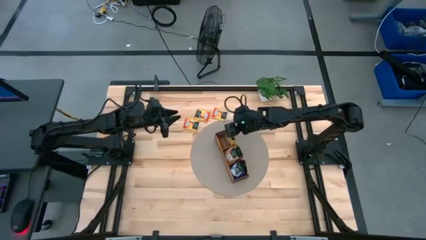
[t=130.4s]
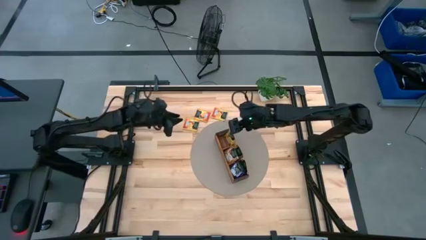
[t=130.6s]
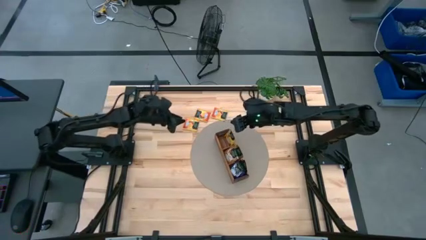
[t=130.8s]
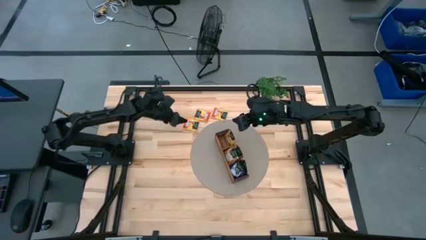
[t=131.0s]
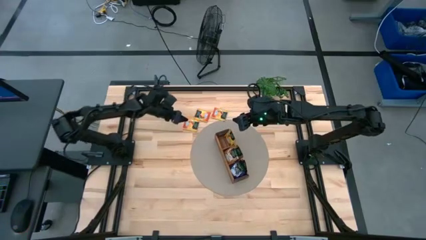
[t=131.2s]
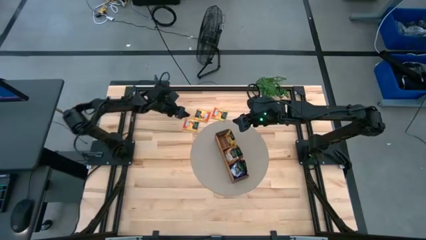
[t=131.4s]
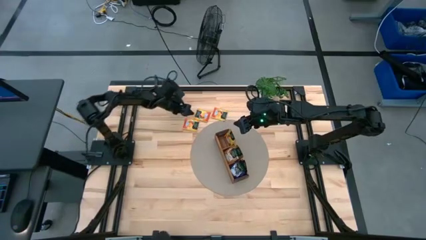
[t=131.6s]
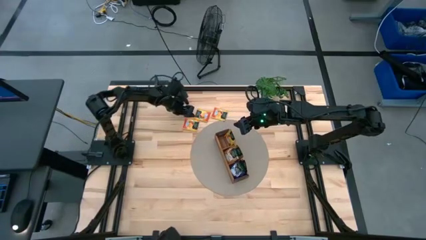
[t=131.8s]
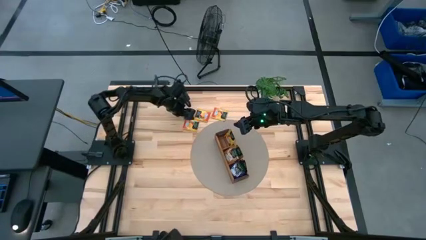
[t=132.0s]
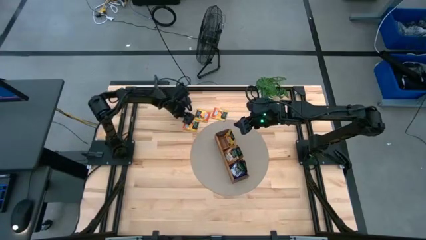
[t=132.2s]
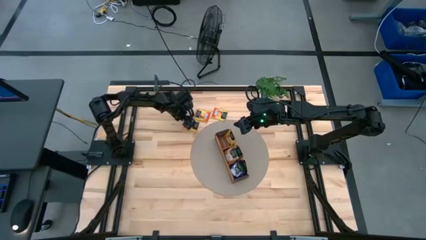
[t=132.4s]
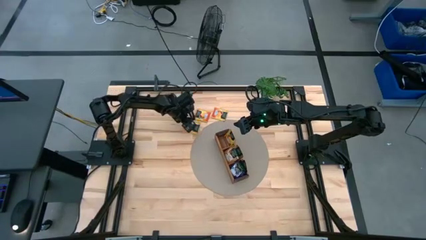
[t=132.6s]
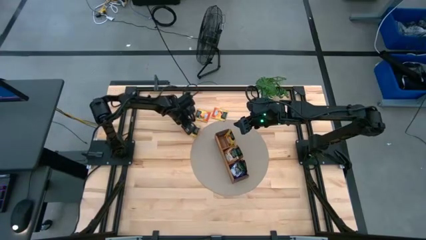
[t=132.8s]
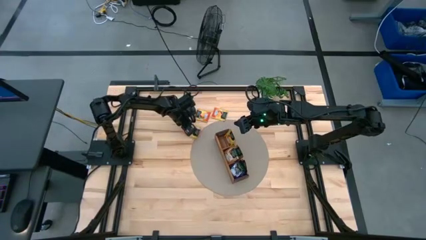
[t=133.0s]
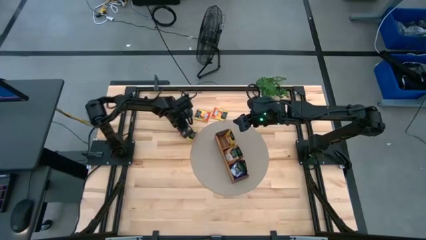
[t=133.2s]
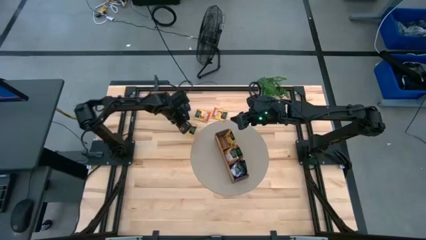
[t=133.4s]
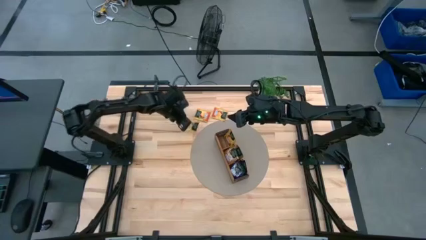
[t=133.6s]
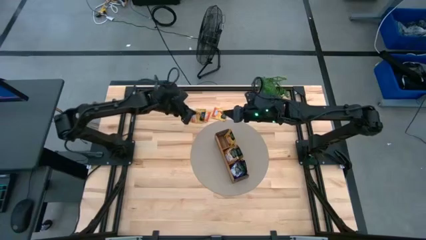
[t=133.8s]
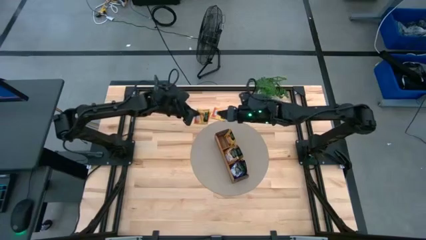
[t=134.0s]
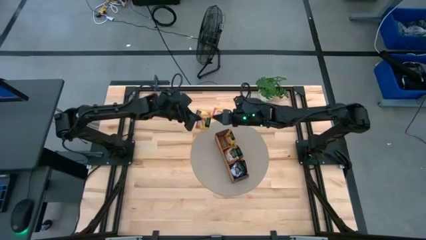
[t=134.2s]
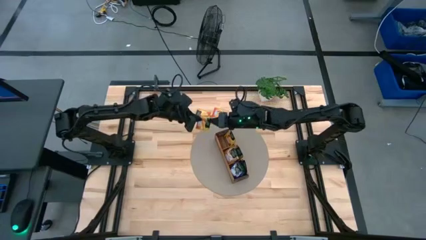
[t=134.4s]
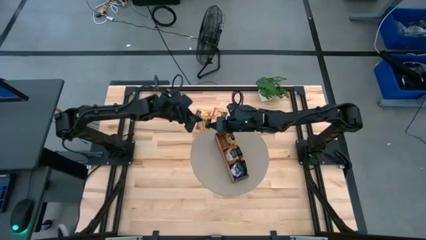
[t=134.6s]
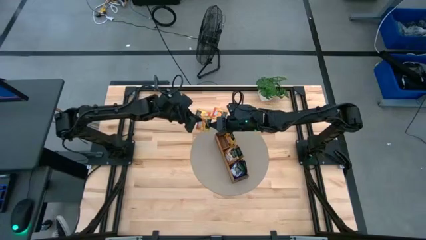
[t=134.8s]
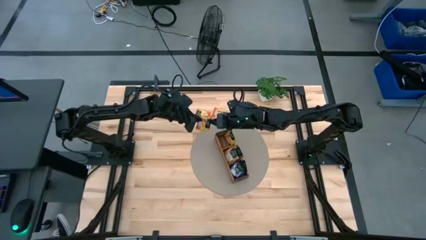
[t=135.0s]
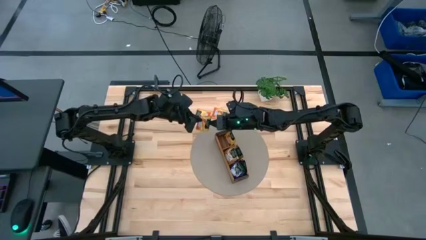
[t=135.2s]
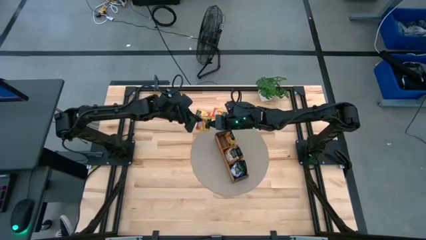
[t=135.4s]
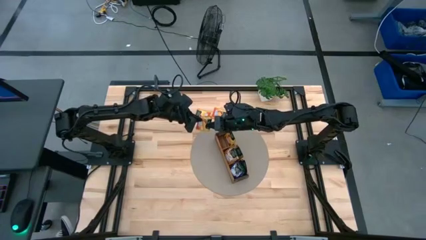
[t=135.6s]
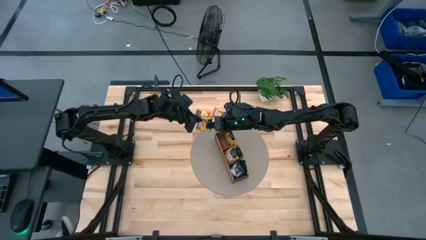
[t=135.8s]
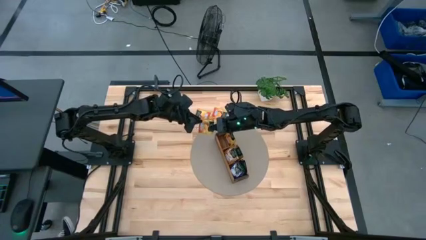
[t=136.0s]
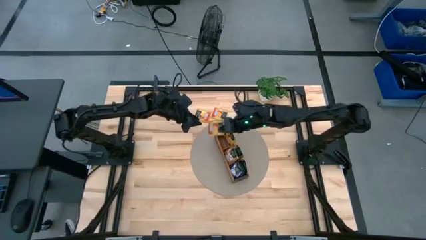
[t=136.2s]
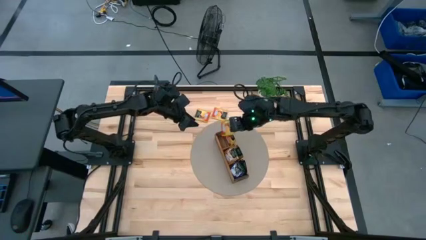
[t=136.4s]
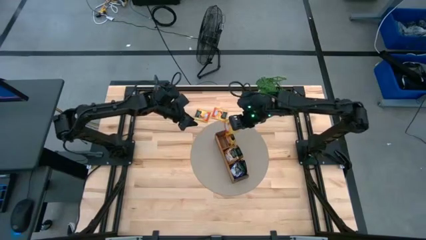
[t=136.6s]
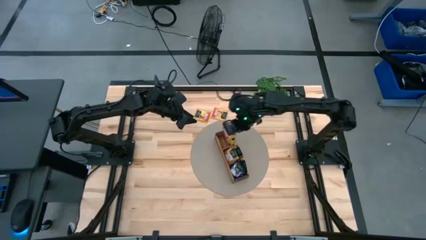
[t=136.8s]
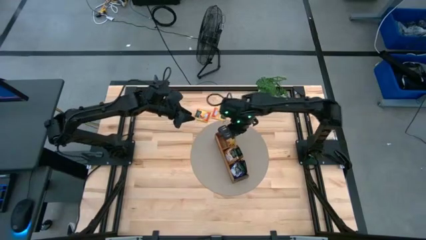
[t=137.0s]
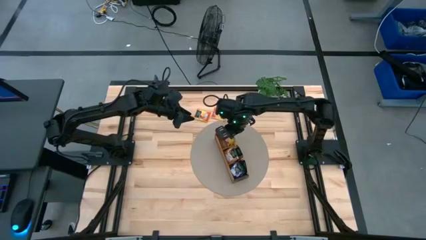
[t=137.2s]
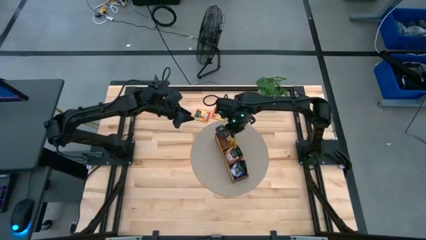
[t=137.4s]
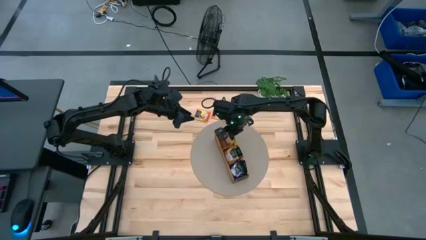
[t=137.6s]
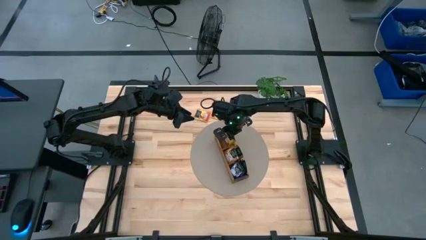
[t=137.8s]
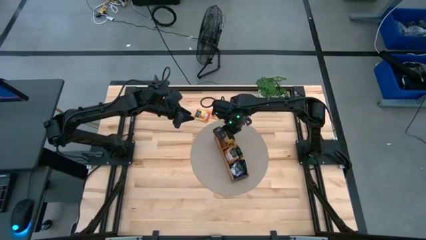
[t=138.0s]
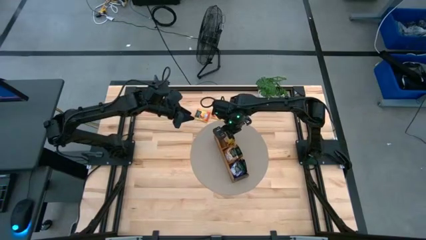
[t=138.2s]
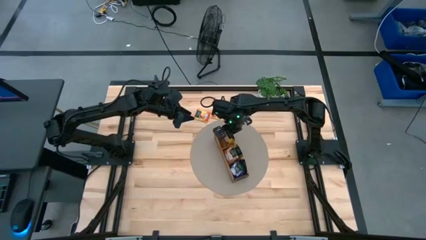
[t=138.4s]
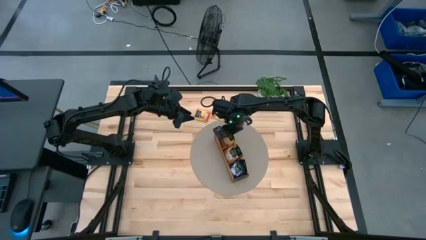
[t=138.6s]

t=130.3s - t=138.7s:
Task: Pick & Place Tea
Put the orange tea bag into the left section of the wooden organizer

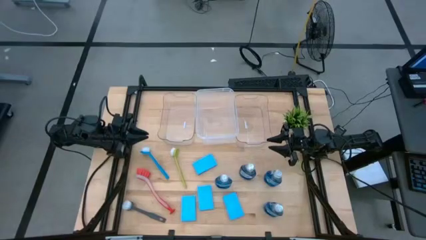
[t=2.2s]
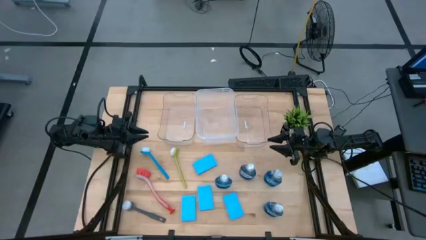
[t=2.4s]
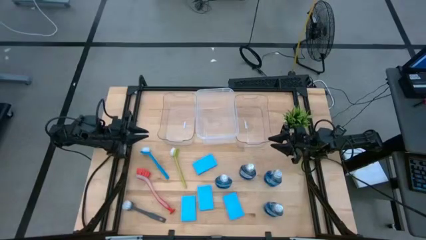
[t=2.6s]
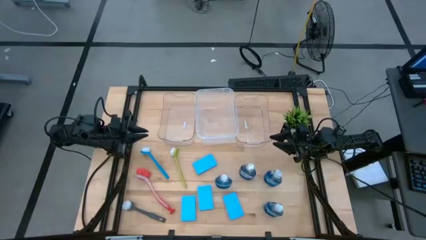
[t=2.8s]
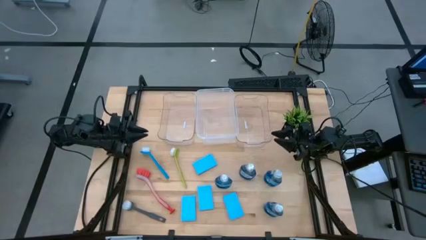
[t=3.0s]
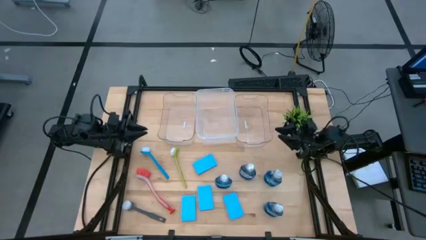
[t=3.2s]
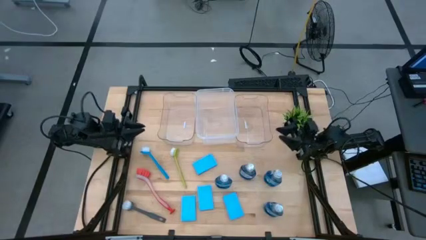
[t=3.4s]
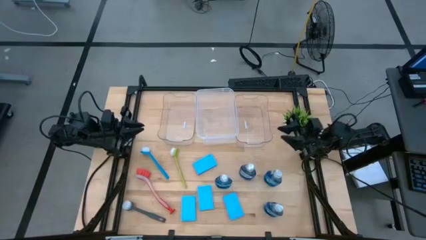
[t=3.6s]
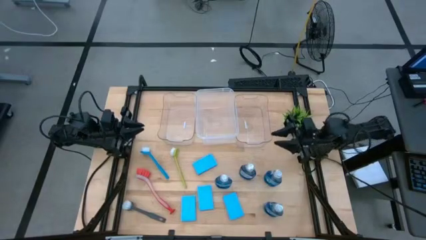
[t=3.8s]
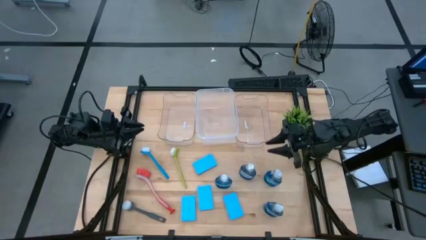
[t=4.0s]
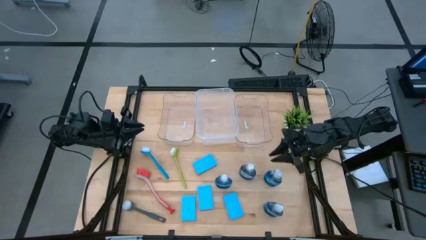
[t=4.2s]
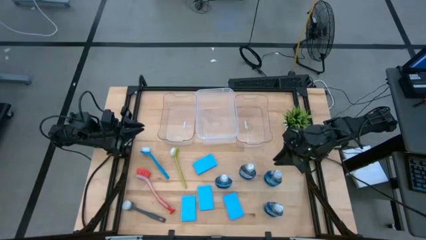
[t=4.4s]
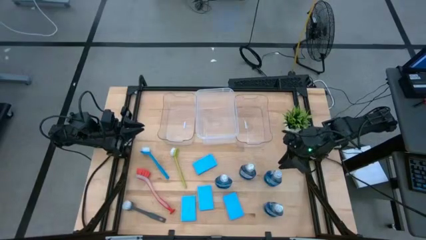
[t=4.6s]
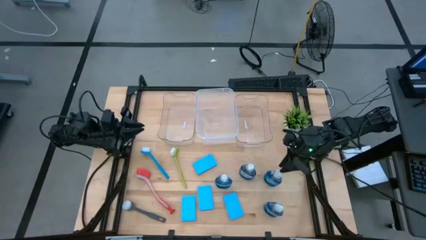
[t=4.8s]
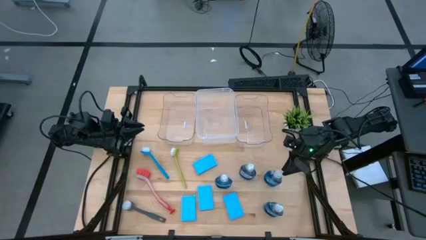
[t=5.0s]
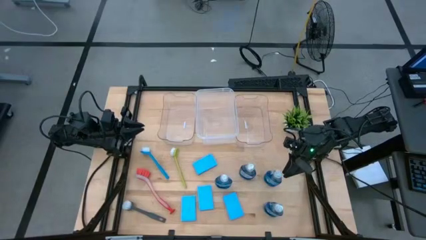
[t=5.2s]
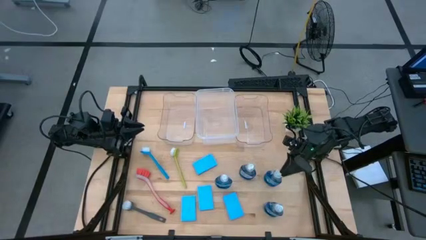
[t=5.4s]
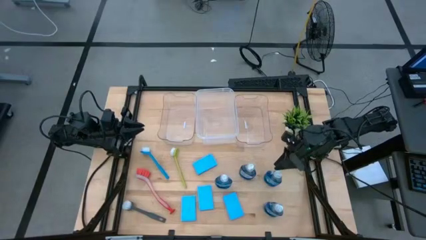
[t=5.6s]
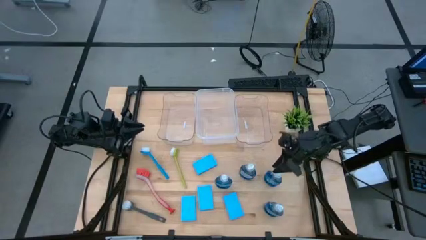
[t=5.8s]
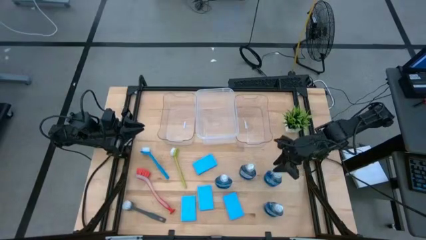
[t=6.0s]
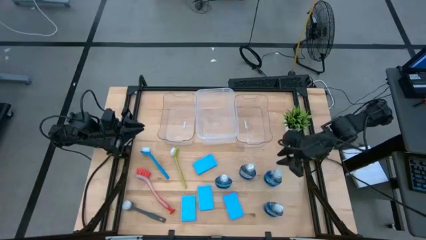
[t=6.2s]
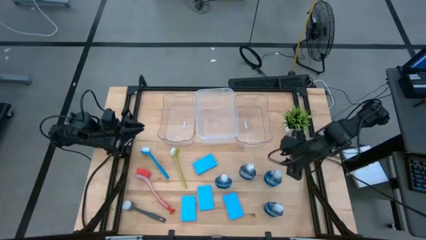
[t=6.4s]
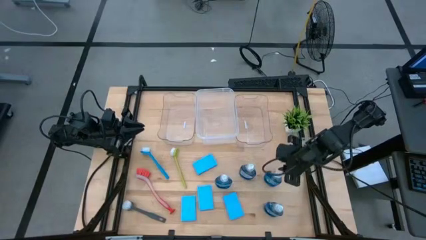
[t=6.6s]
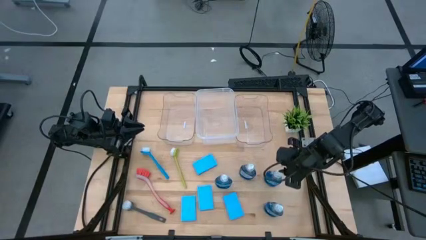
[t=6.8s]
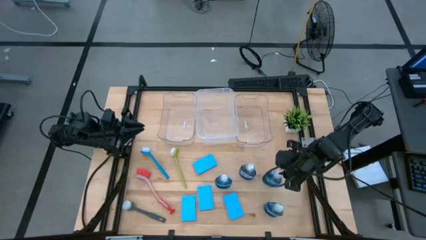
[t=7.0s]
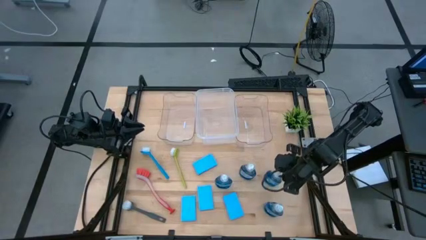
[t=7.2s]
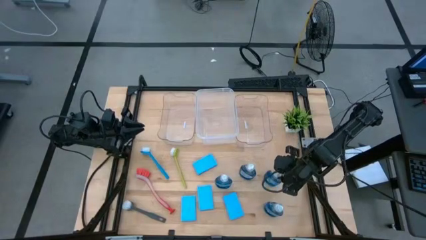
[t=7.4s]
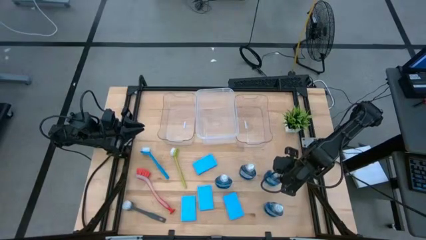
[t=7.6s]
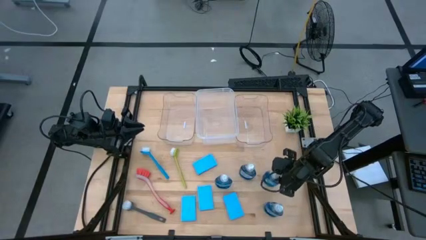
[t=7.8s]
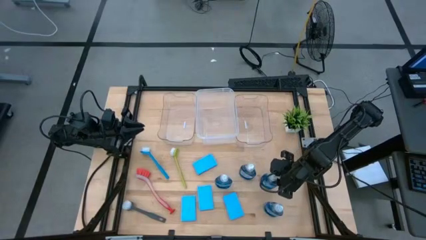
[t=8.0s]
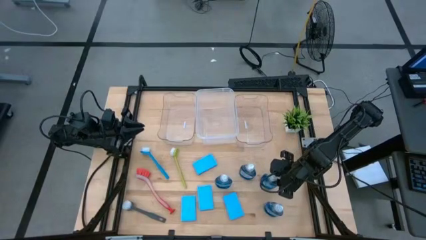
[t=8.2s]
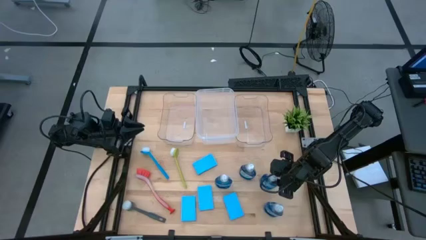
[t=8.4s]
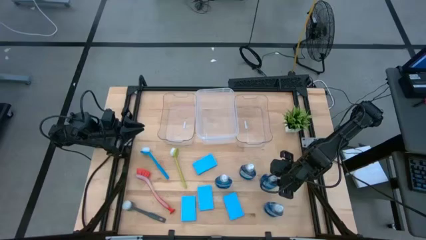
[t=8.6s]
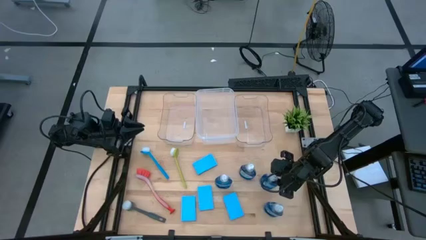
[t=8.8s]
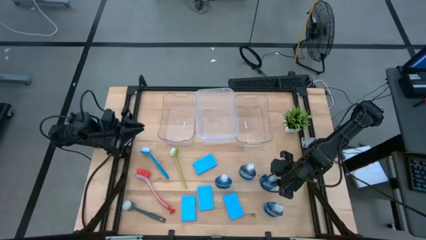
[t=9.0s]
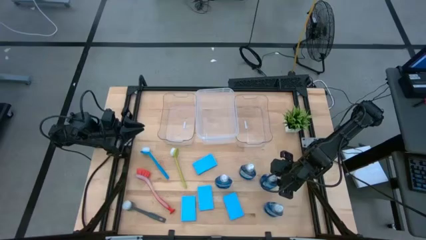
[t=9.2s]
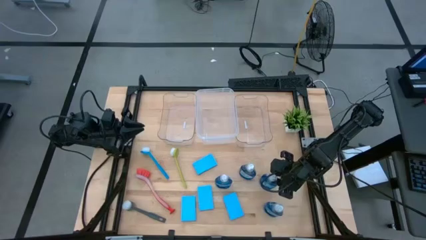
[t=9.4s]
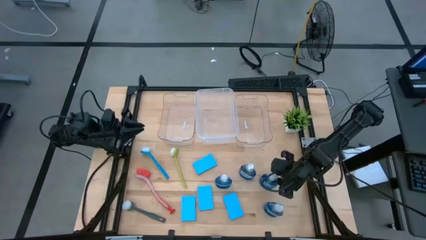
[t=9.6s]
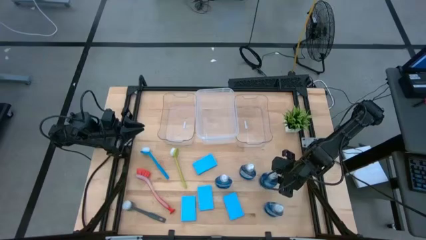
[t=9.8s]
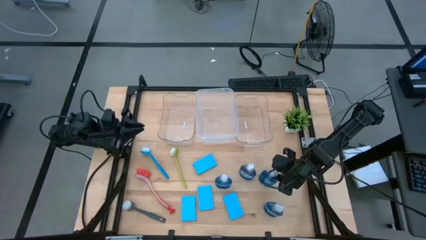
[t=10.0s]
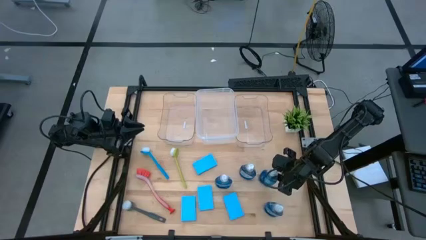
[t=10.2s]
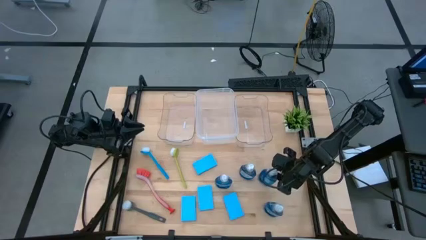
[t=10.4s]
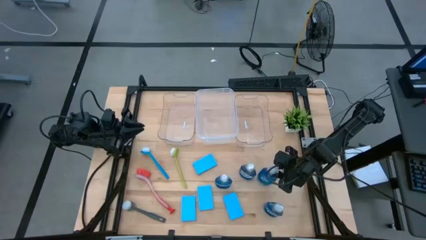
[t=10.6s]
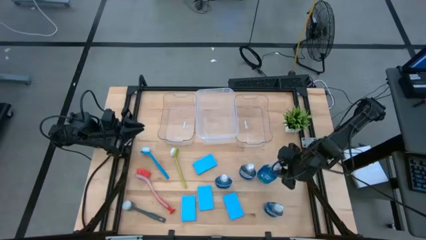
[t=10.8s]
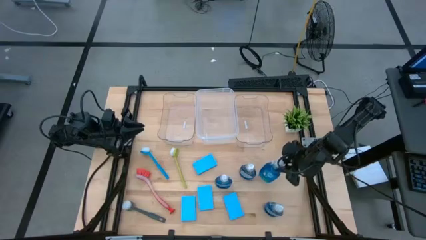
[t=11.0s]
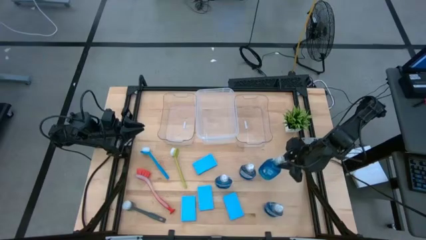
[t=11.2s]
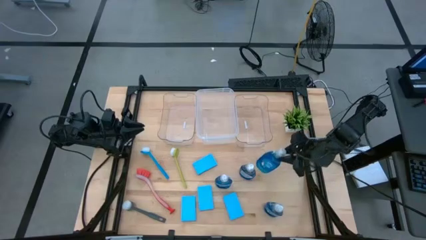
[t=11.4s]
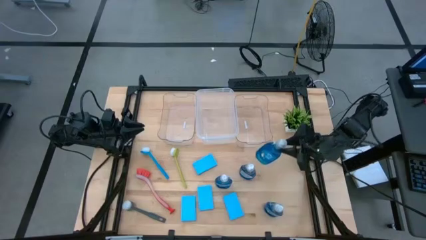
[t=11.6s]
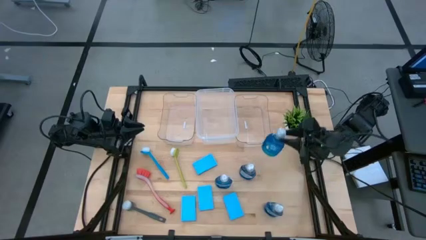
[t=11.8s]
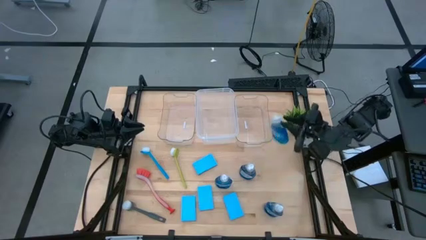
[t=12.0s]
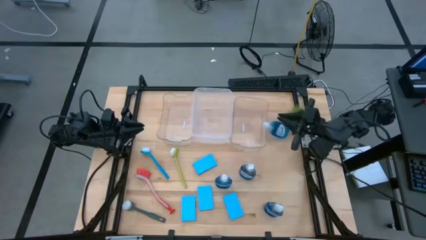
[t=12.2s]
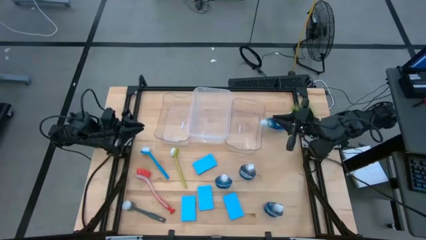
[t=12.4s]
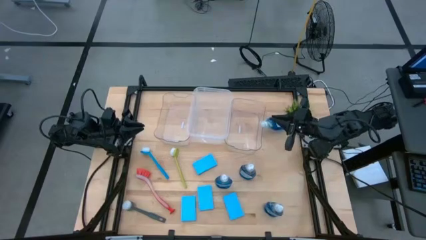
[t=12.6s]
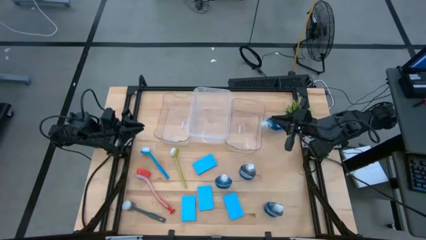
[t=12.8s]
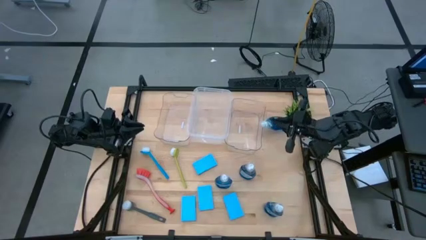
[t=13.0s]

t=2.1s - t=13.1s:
Task: Pick & Place Kitchen Sink Supplies
Put the blue dish soap into the right transparent bin
